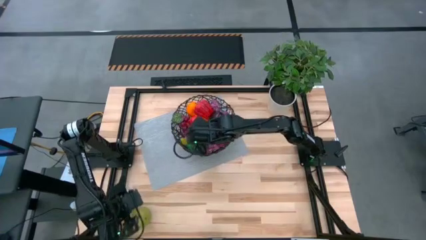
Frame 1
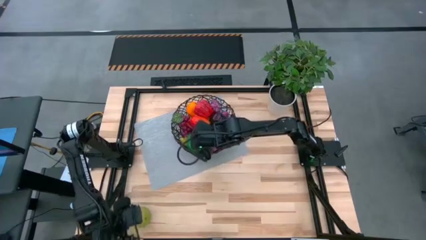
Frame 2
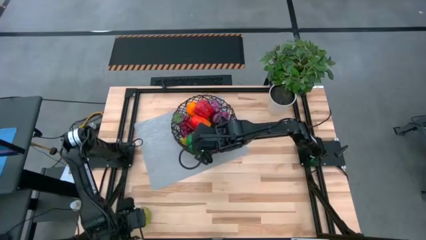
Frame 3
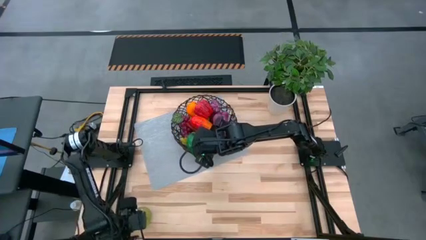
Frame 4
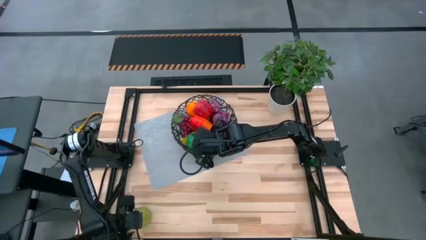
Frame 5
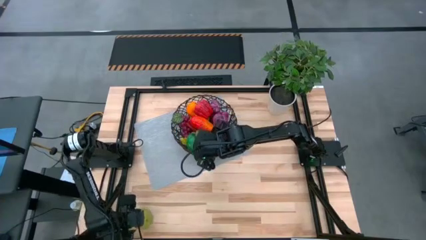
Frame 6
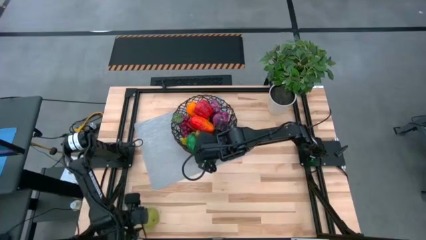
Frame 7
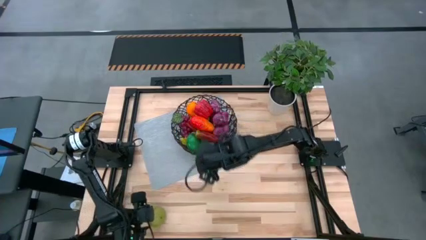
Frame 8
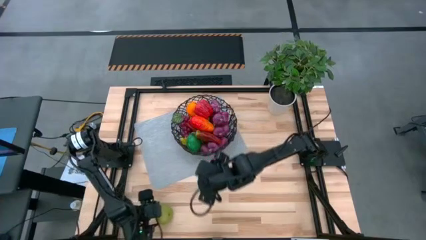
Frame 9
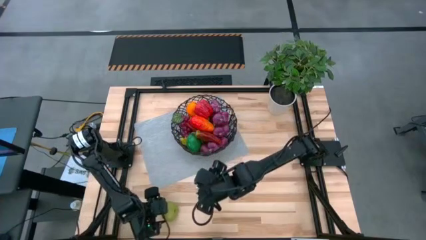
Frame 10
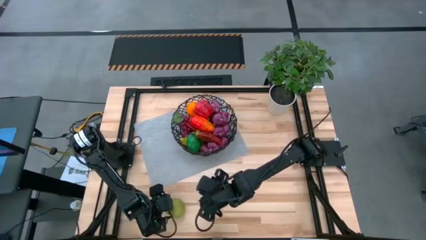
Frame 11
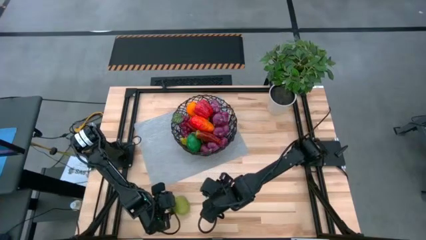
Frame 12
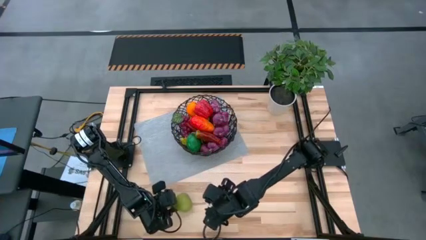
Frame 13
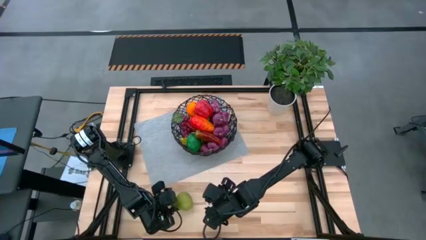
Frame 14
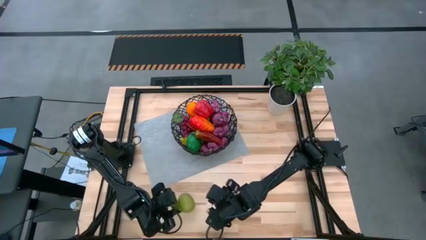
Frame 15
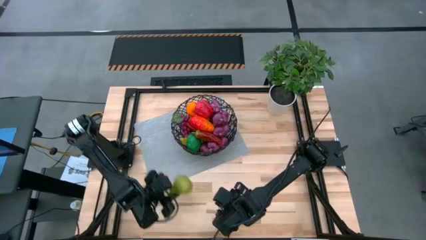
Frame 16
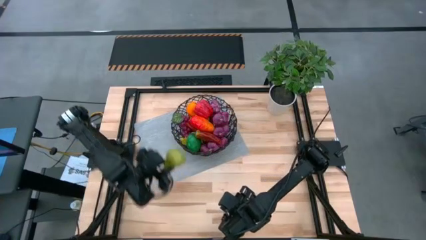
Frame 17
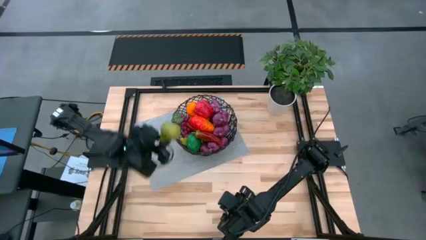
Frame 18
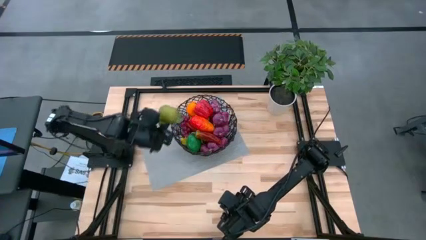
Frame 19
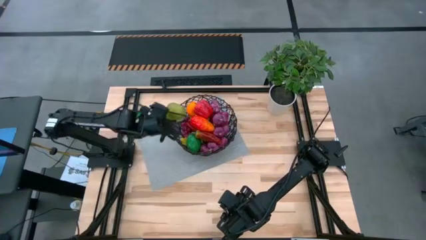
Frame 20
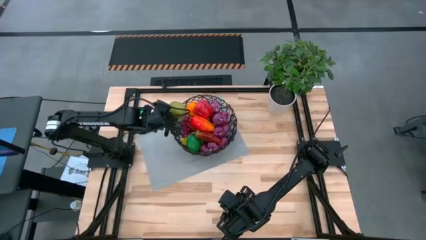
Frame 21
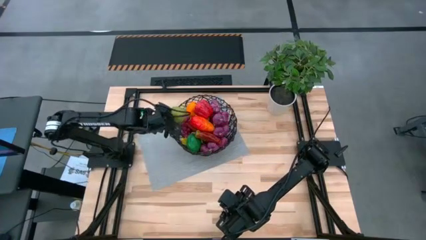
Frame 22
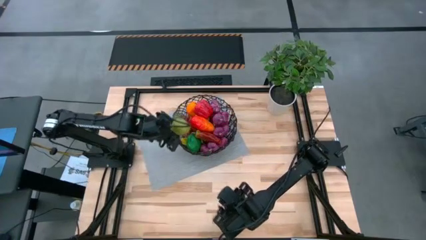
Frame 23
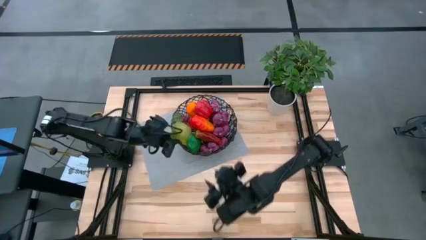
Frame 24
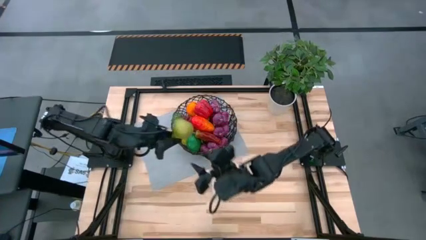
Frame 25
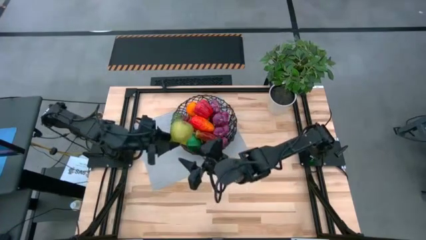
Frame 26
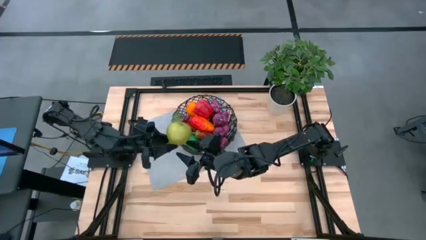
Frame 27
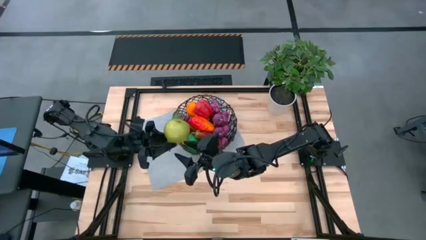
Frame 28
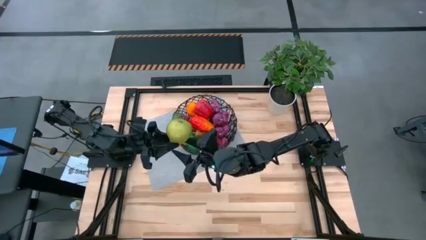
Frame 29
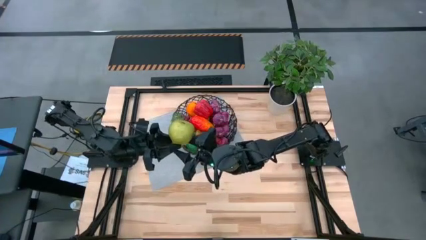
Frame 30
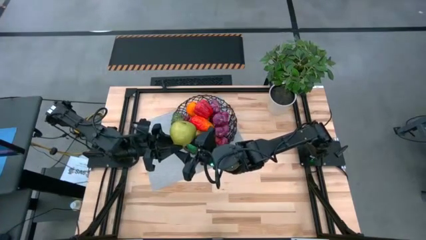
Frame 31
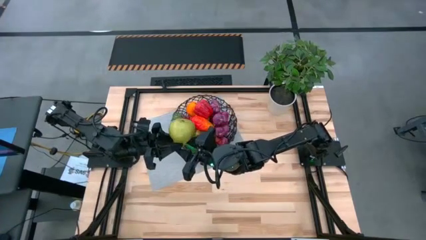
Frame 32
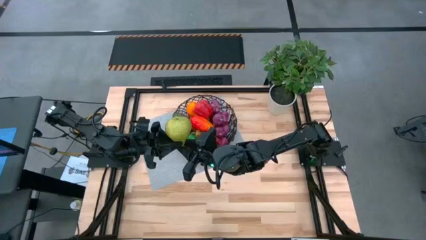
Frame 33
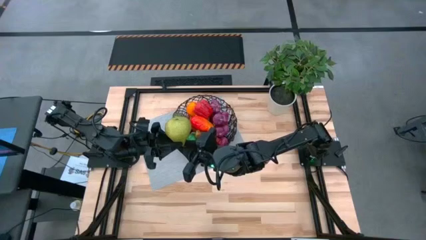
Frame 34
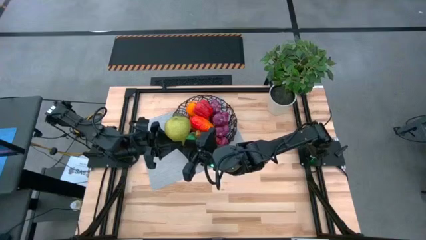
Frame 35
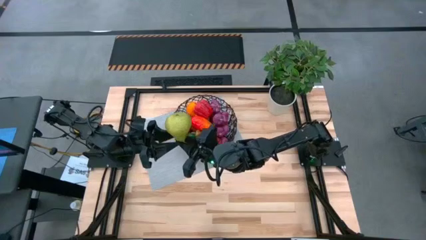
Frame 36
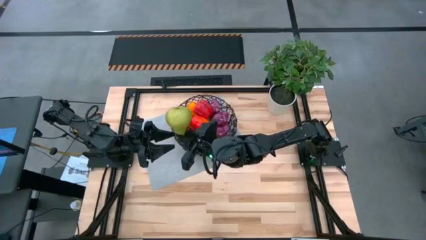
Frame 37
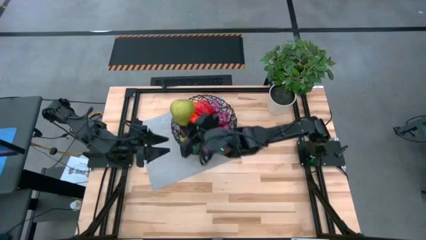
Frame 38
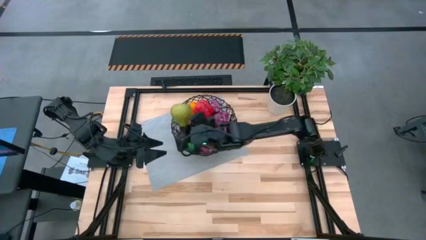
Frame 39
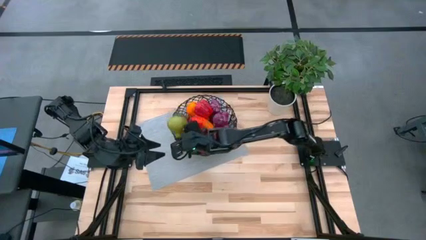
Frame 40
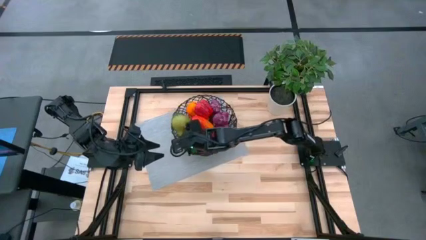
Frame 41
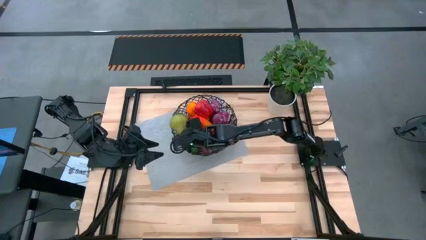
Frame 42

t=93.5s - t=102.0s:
Task: Build produce basket
Put the pear into the wired basket

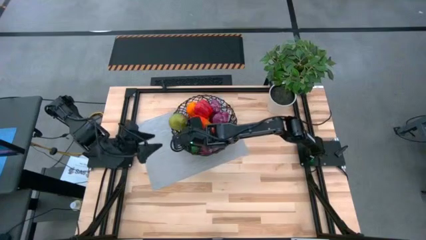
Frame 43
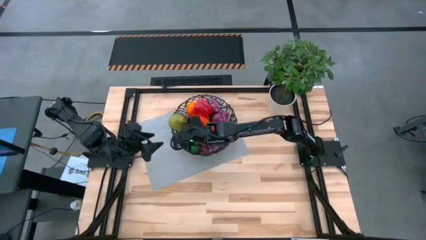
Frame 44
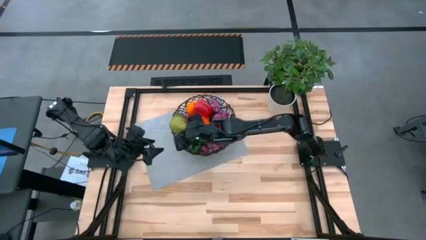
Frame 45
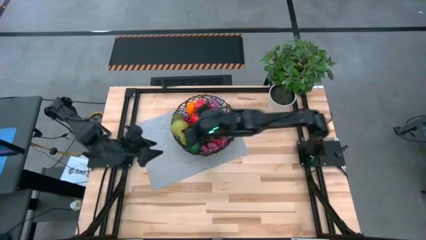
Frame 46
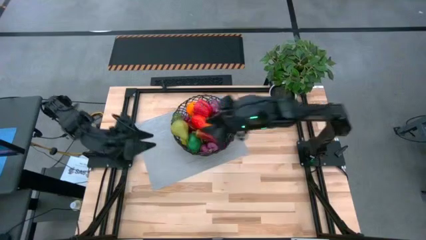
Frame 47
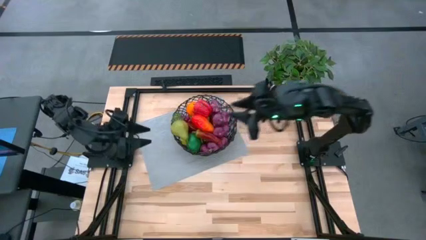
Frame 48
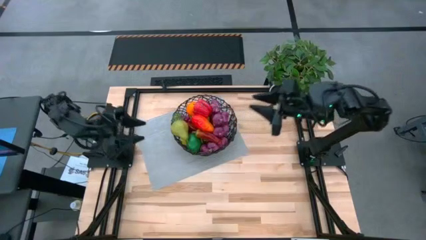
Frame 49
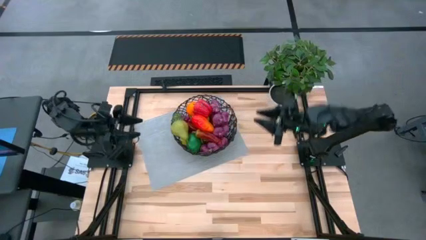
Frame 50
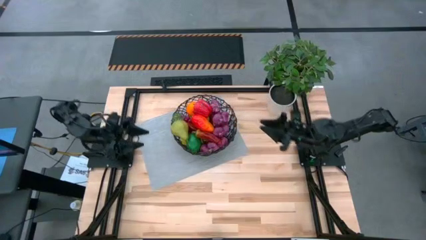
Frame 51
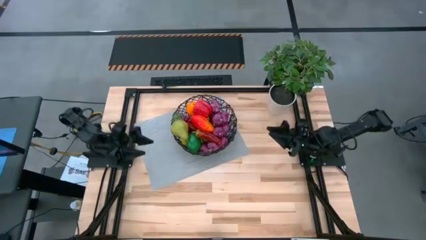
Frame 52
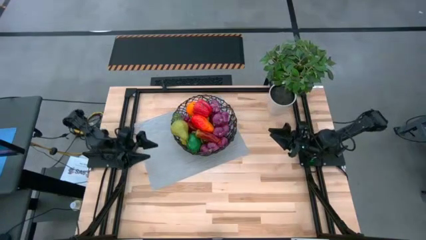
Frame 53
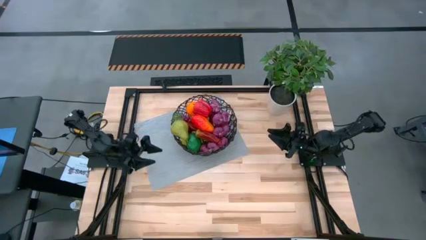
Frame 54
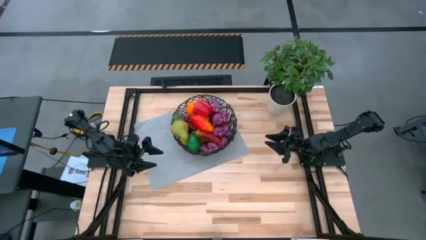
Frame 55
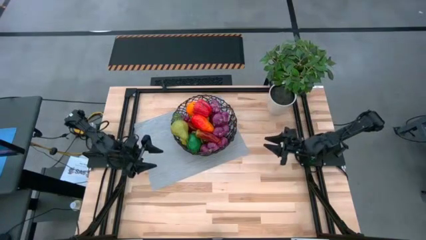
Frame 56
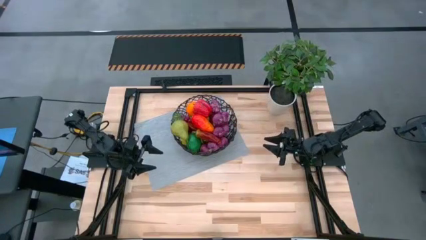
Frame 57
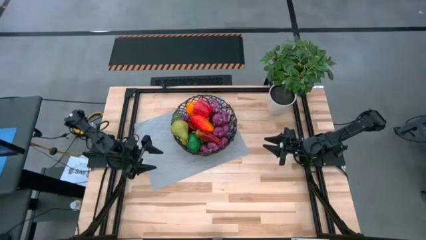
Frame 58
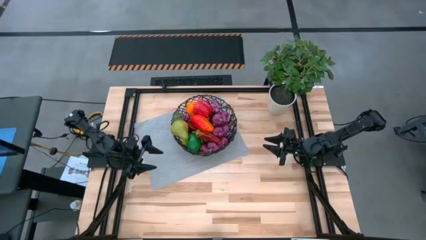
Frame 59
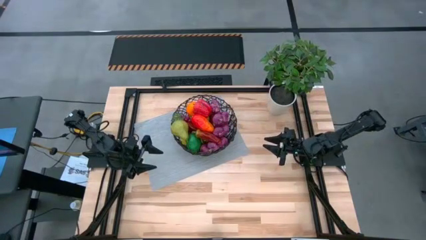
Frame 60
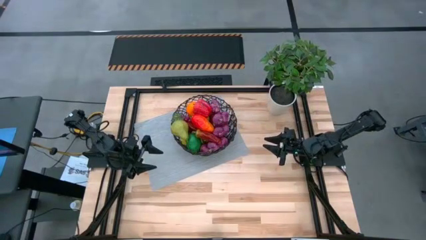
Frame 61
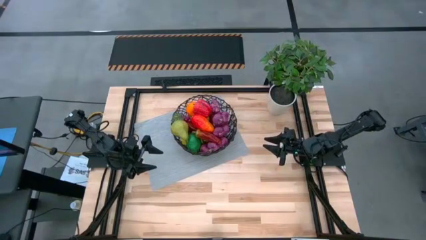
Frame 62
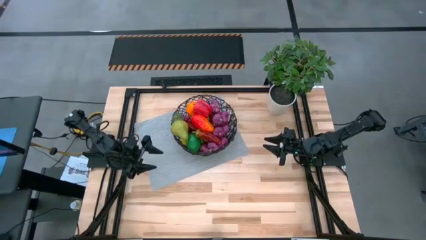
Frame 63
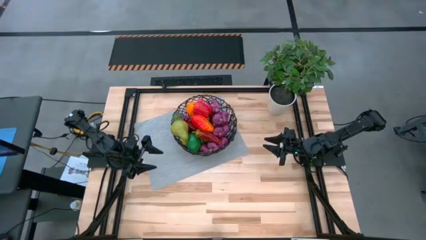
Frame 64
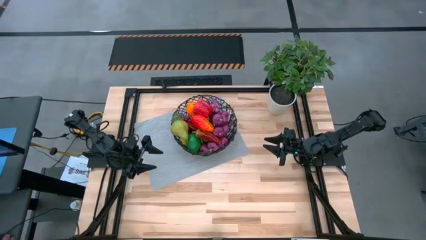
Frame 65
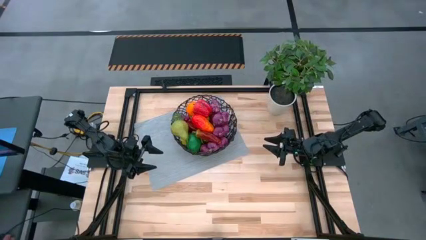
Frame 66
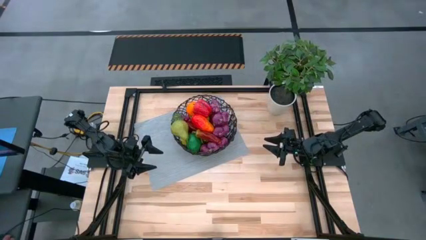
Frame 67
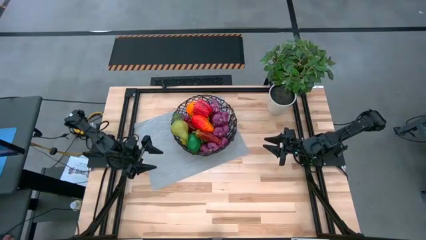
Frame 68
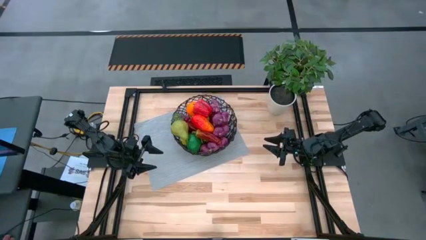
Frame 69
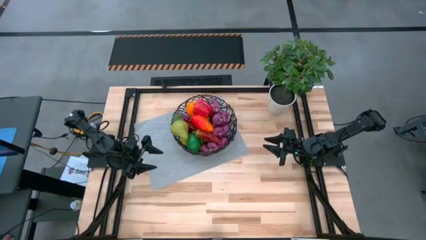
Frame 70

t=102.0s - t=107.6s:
Return to Home Position

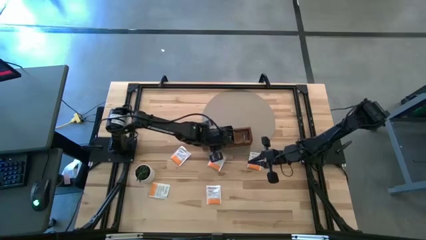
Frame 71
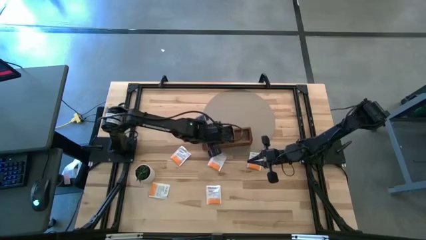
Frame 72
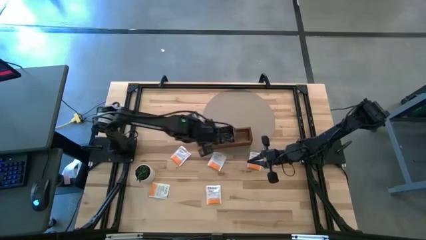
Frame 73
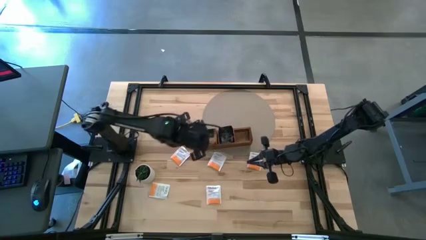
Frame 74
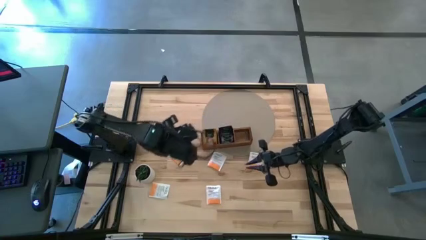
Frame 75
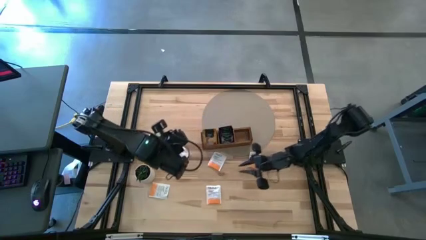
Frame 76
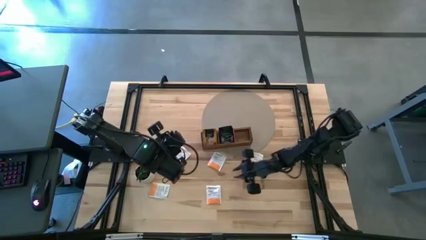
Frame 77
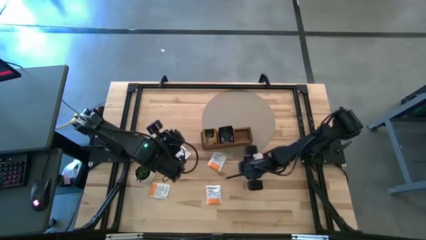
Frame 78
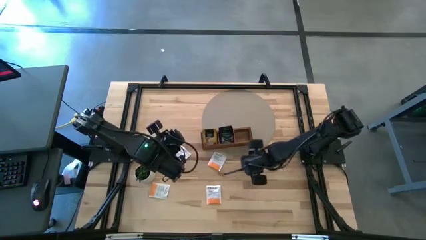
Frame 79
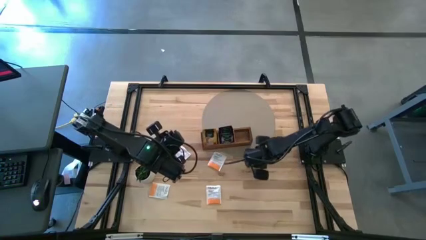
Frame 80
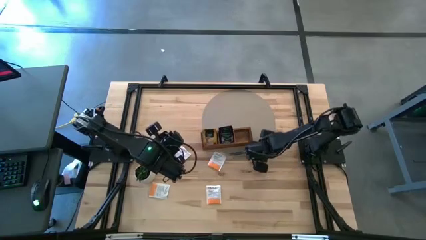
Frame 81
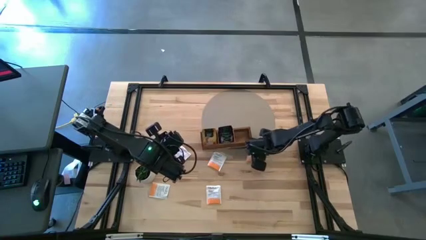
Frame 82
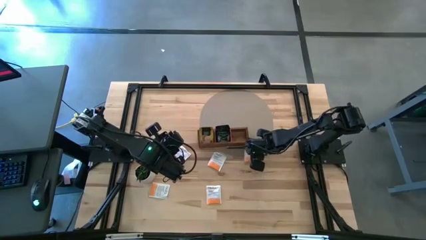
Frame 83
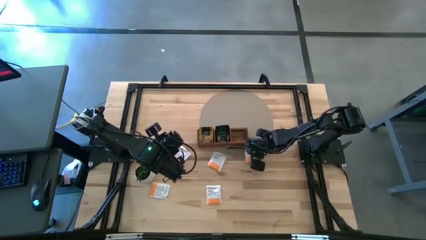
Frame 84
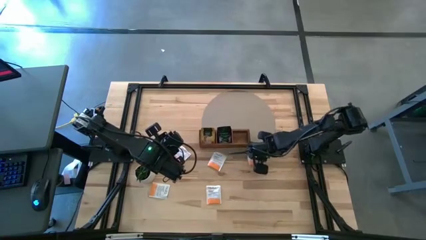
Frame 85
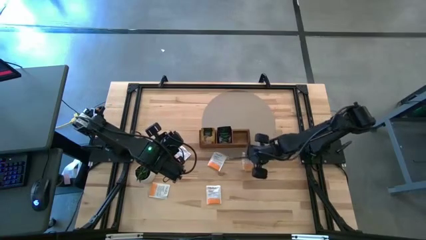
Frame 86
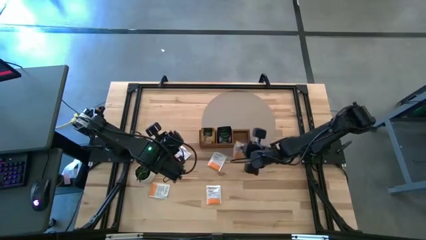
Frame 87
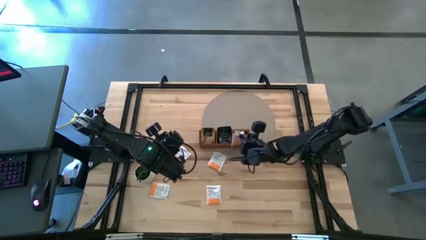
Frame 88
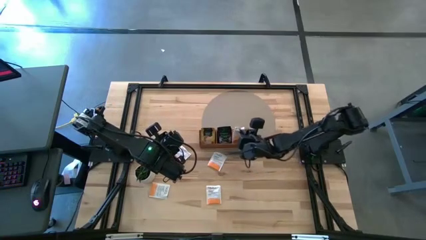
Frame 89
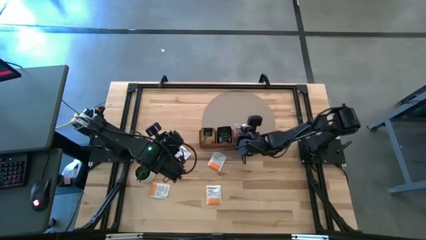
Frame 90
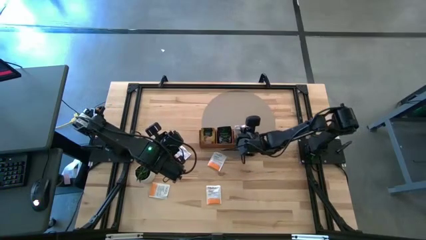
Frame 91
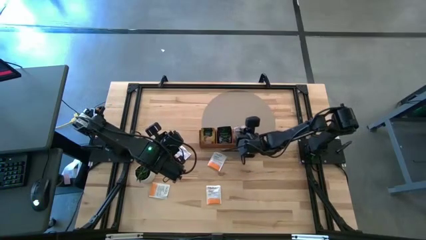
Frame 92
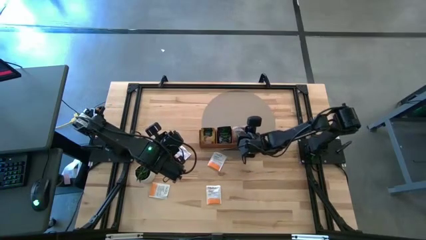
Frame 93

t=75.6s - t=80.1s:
Task: Pick & Place Tea
Put the white tea bag into the right section of the wooden organizer
